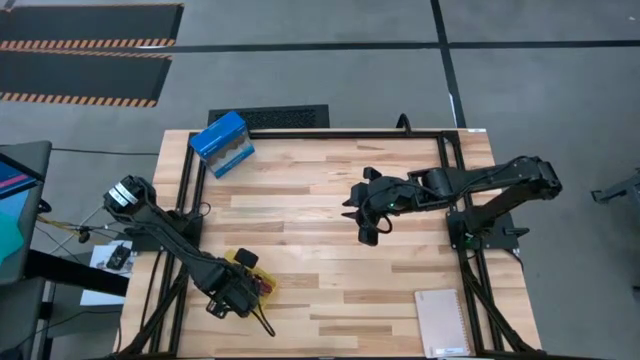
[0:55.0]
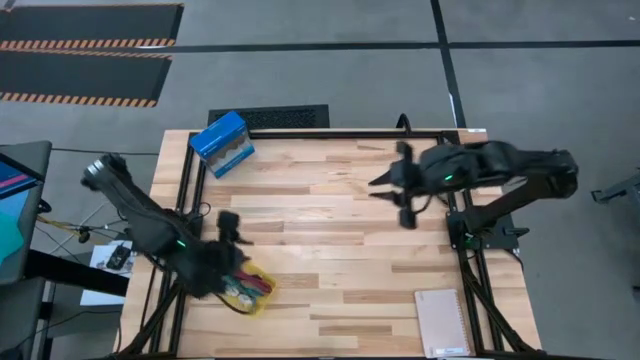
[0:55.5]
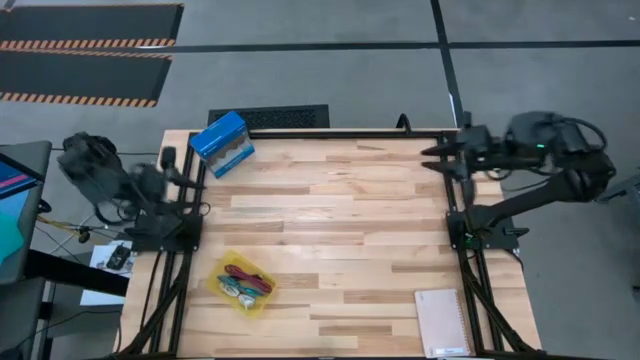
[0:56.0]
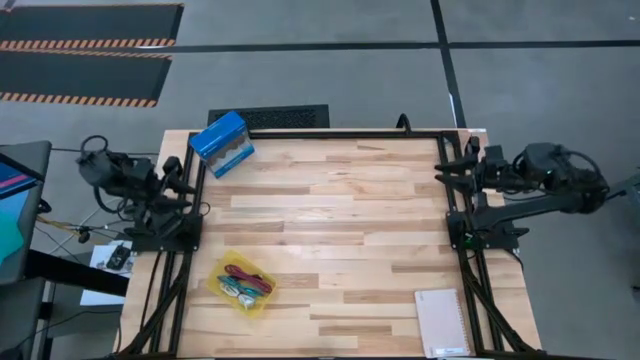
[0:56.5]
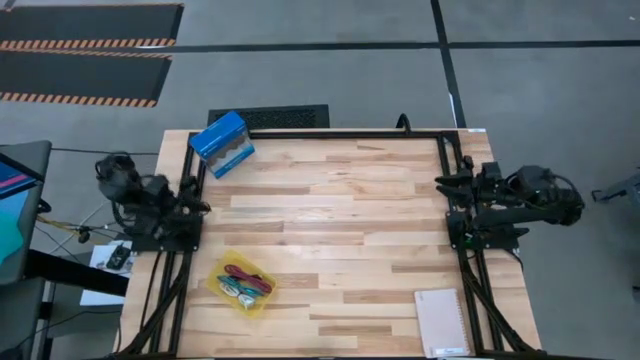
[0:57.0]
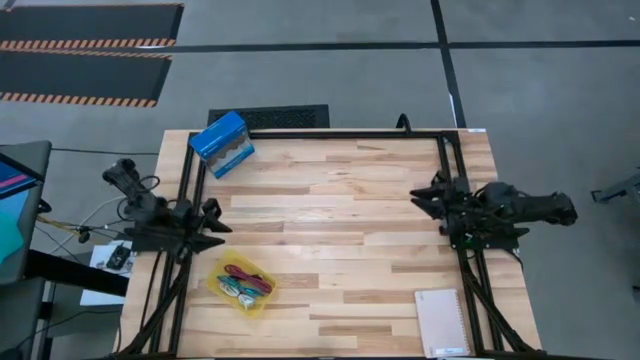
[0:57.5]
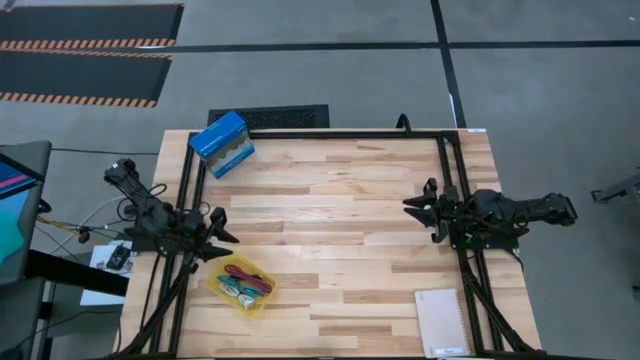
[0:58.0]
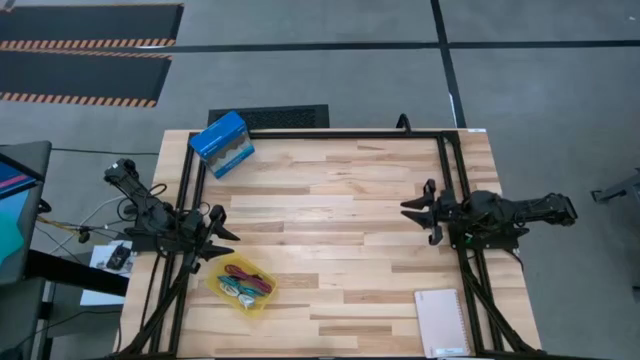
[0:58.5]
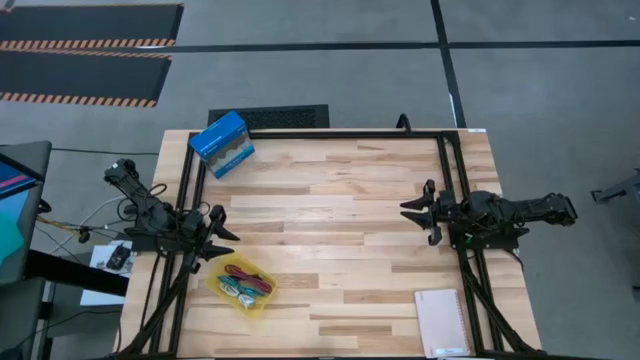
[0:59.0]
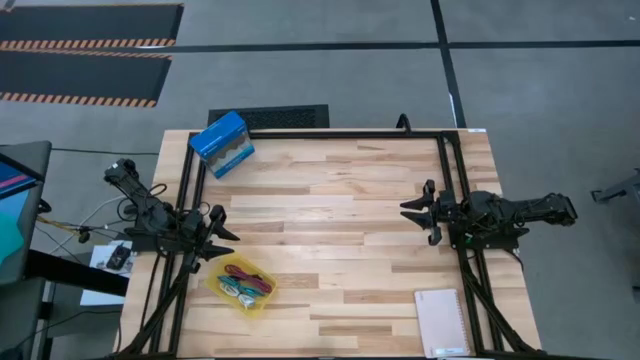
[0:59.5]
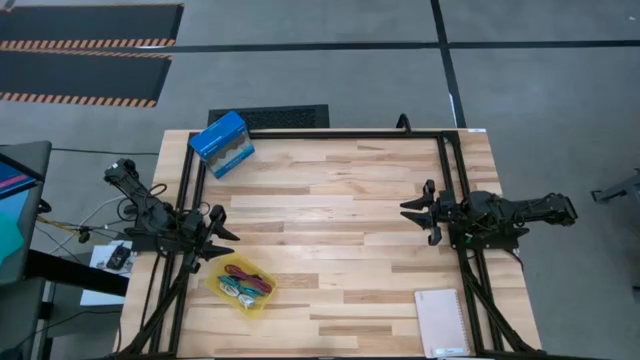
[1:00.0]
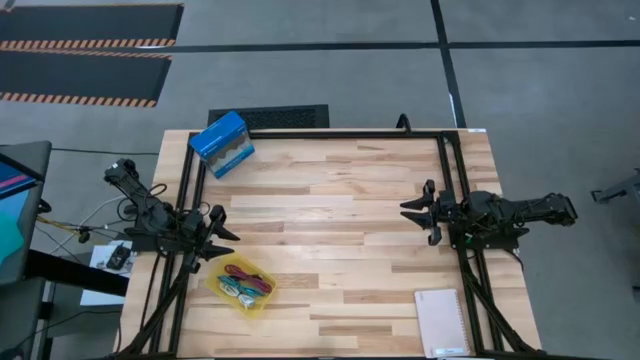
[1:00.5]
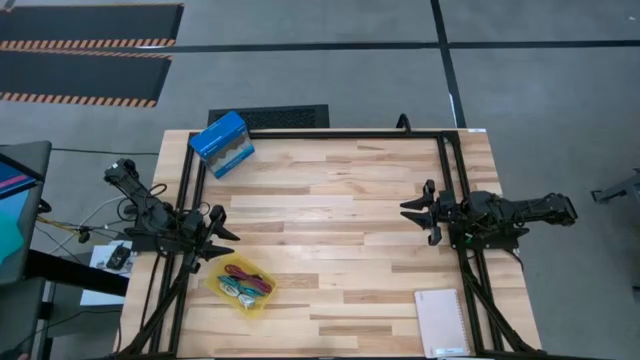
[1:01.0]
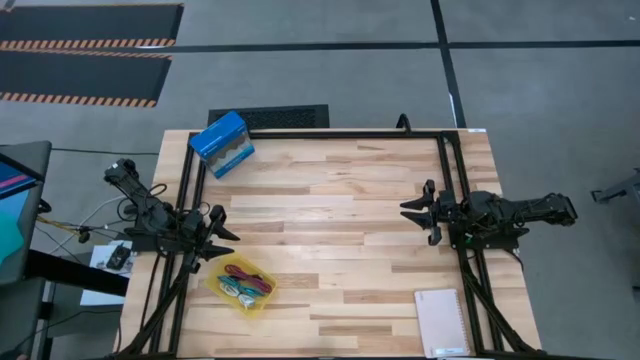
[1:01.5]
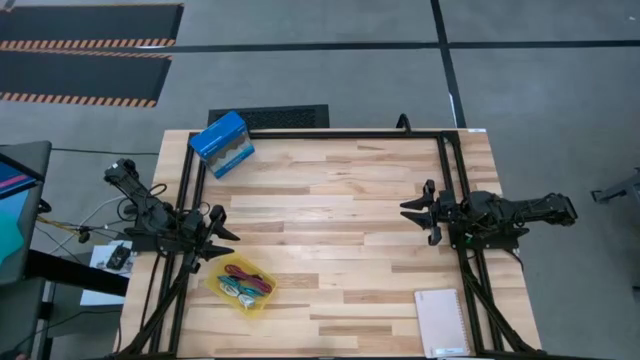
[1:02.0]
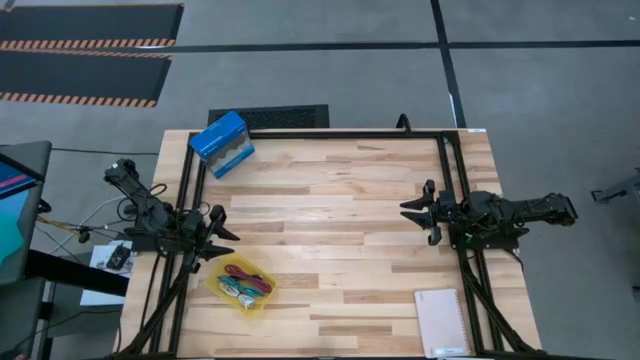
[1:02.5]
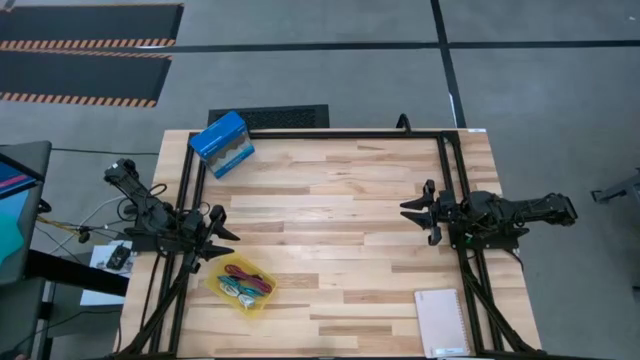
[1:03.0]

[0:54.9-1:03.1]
Task: Pick and place USB-C Cables
Return to Home Position

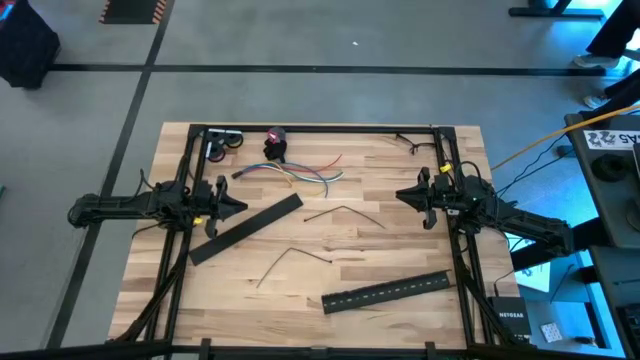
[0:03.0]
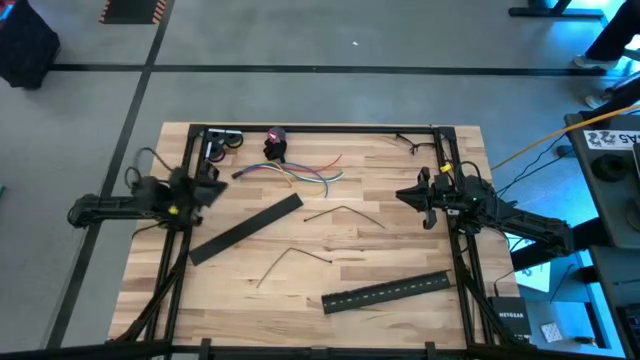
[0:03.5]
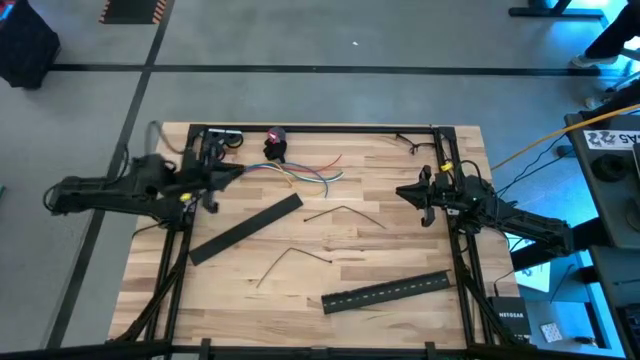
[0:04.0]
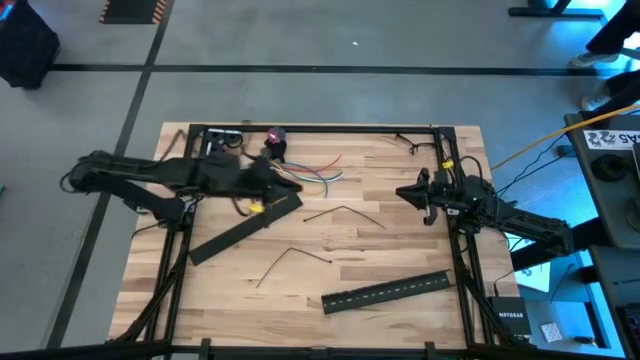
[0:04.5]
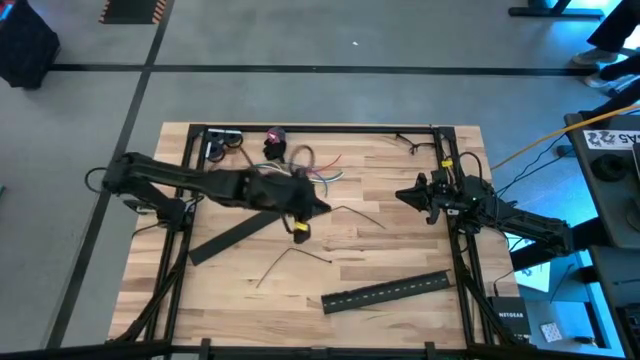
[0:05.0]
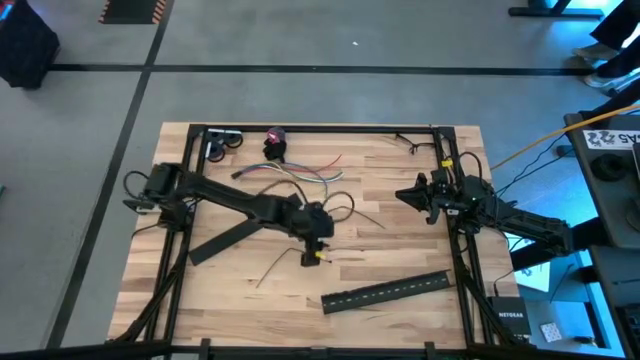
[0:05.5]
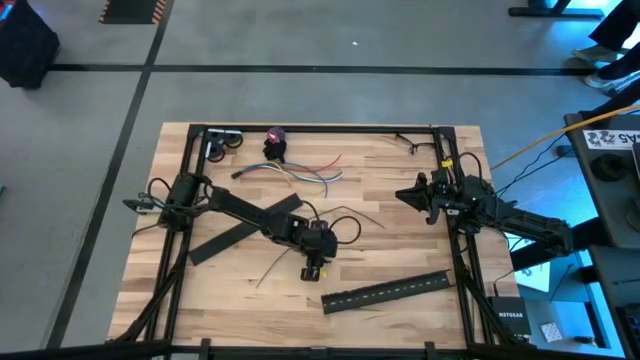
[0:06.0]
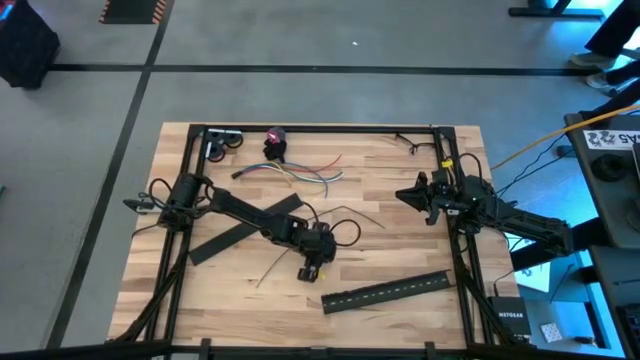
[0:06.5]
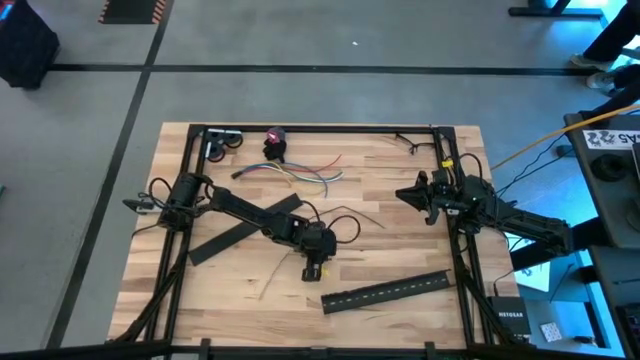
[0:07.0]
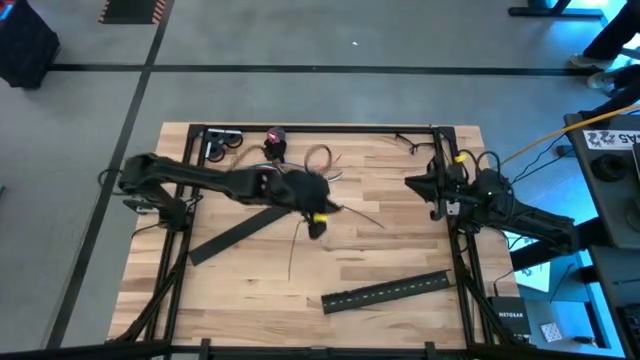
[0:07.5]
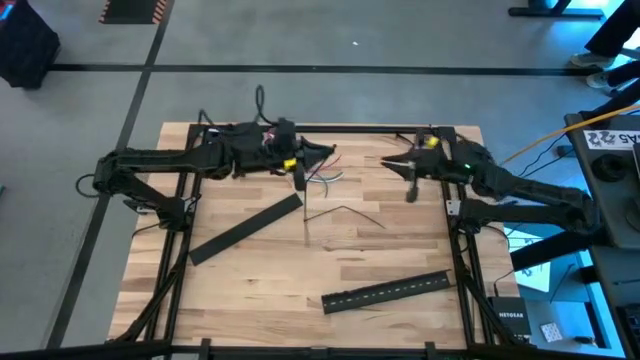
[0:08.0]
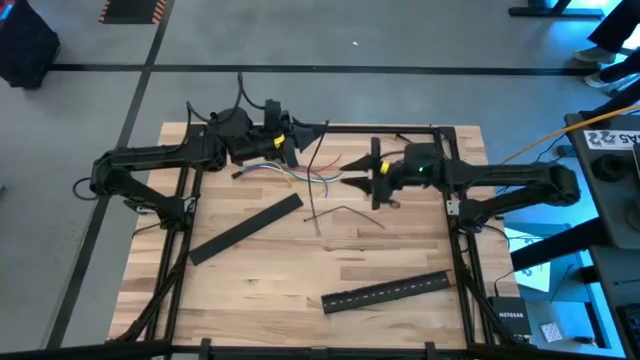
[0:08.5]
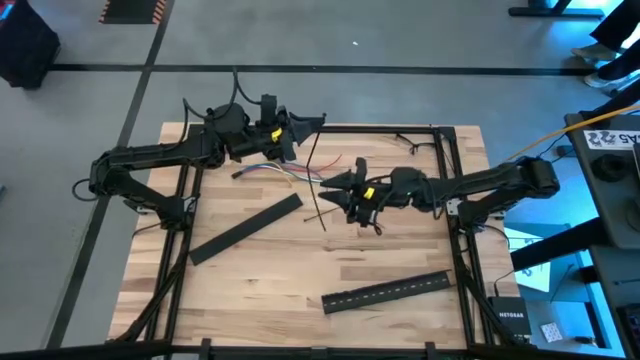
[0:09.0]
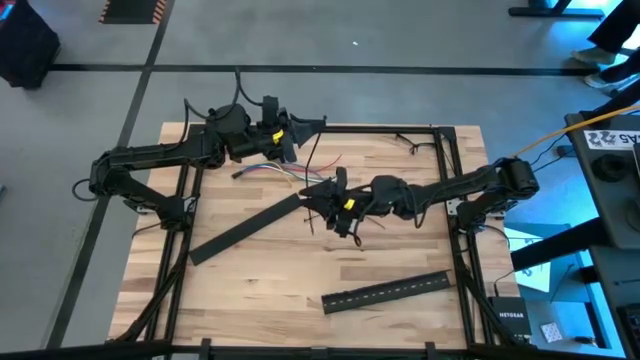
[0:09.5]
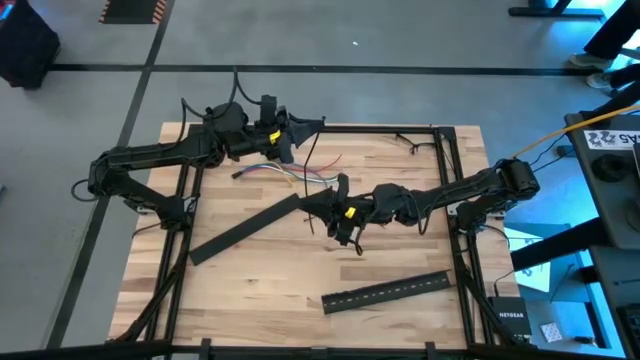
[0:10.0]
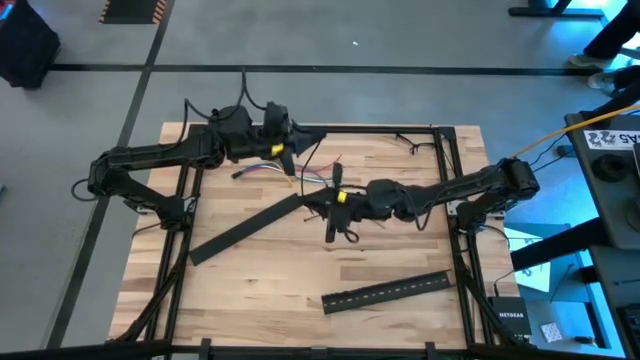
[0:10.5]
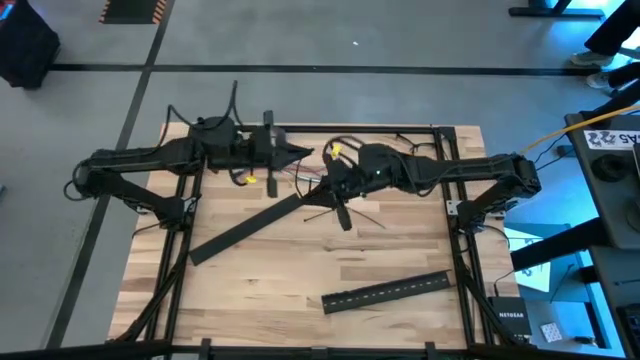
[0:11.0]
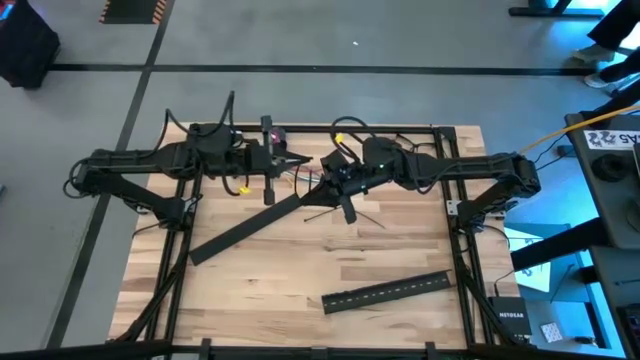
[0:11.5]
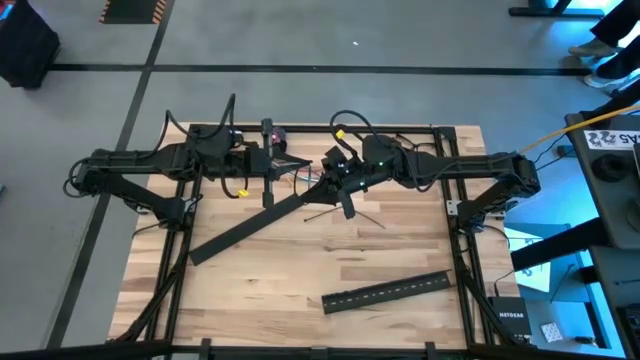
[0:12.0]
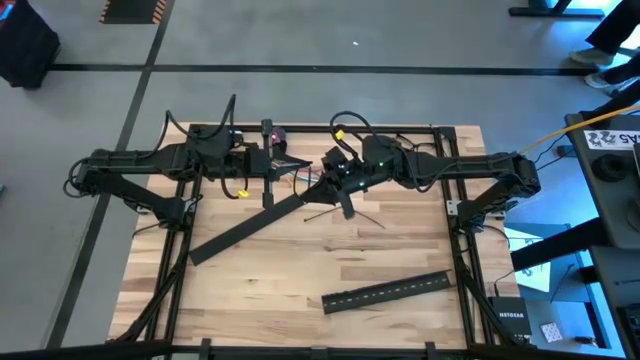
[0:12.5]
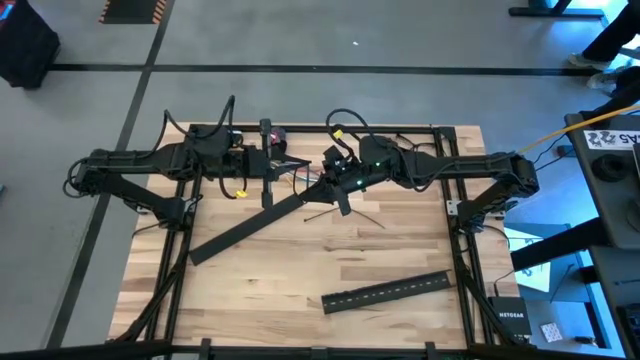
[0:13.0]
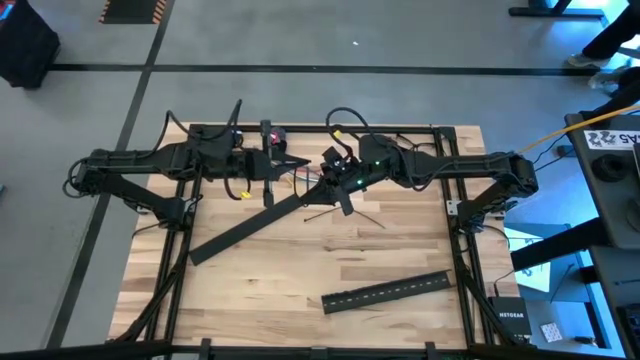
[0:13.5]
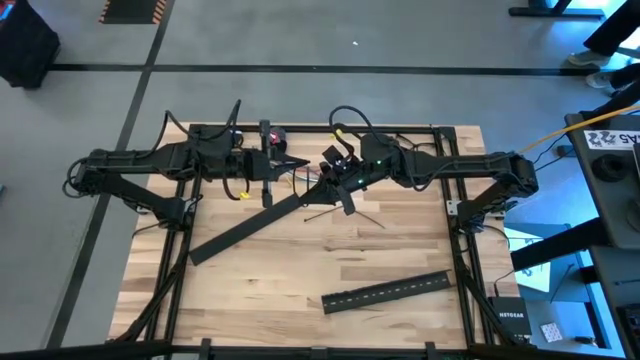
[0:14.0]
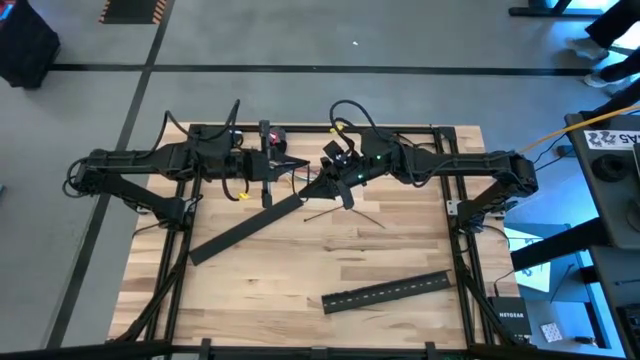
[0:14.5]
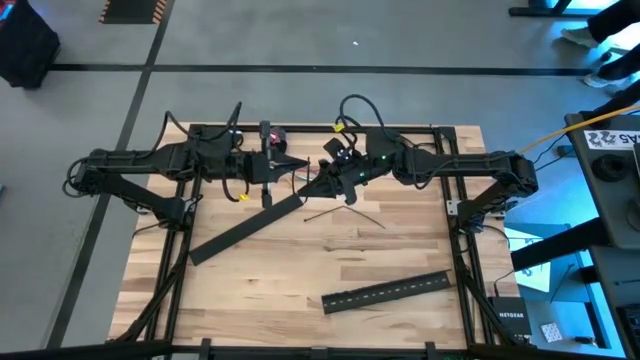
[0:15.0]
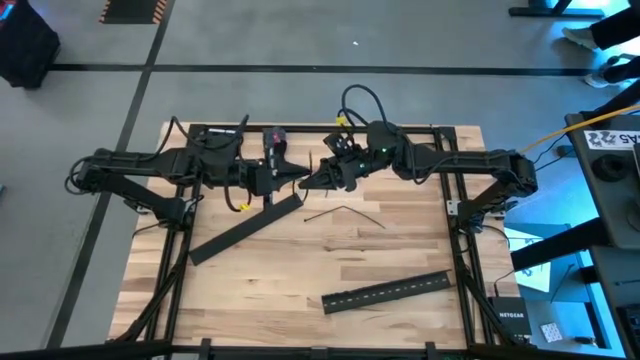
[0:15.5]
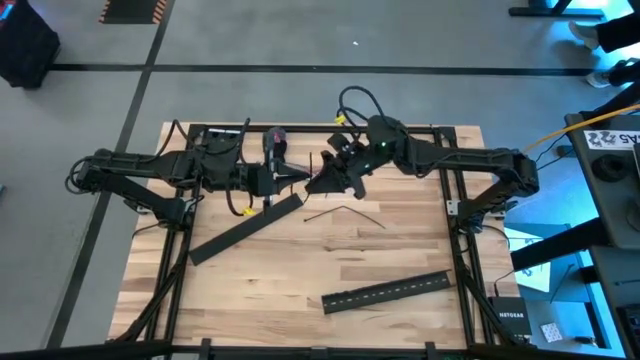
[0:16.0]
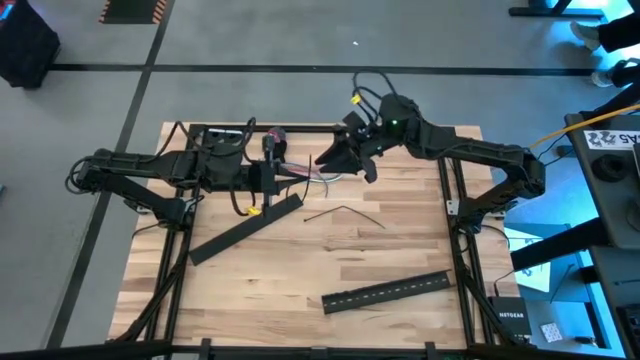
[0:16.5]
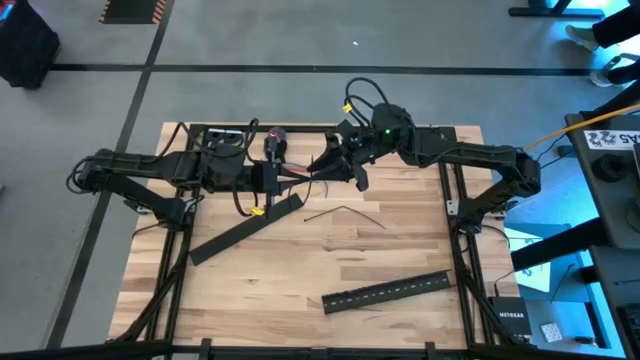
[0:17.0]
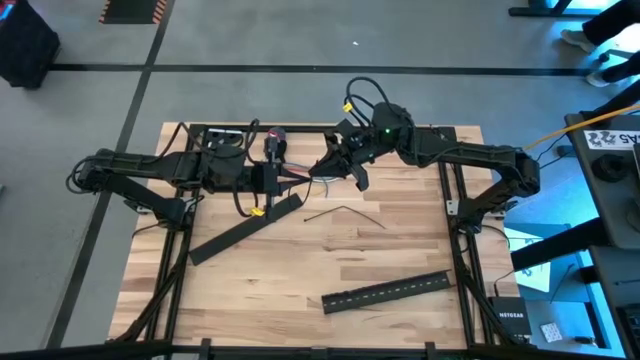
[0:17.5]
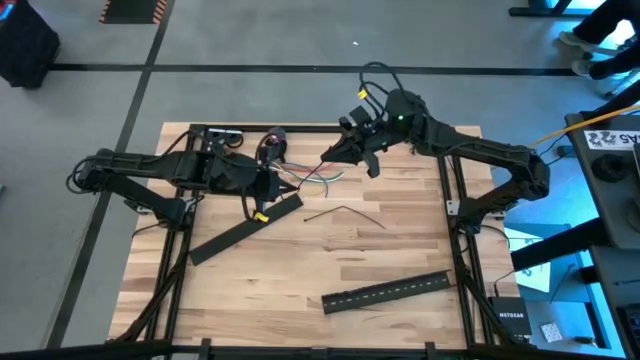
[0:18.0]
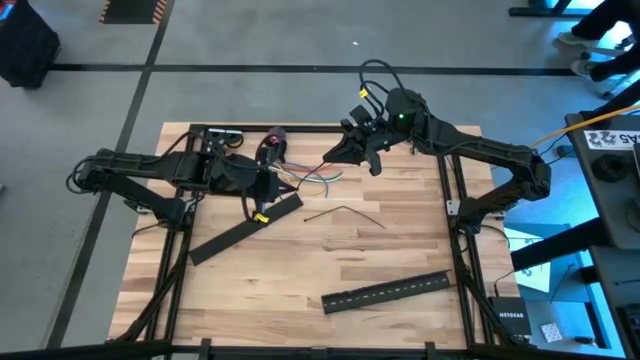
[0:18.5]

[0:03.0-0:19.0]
Task: Ziptie cables
Wrap the cable wires with the black zip tie
